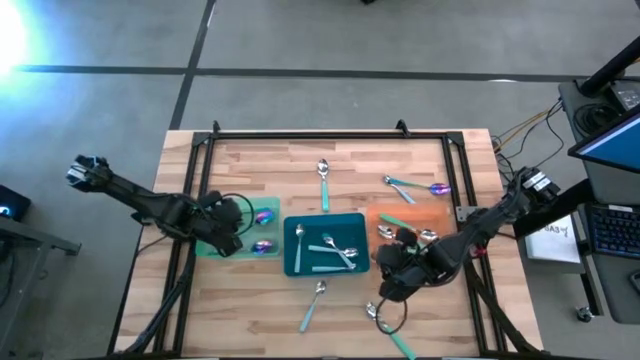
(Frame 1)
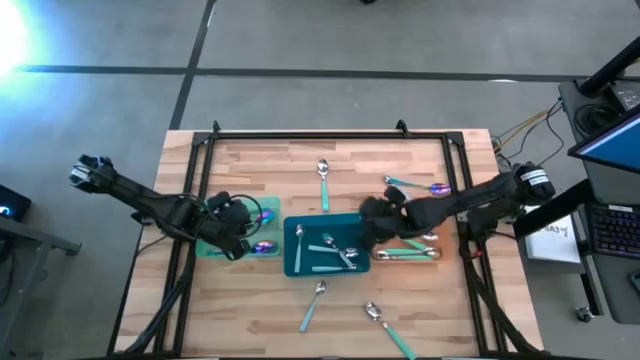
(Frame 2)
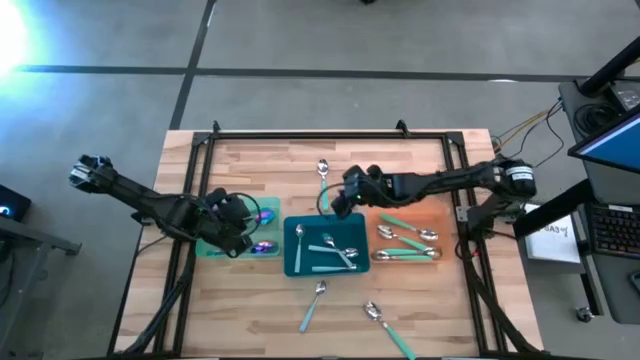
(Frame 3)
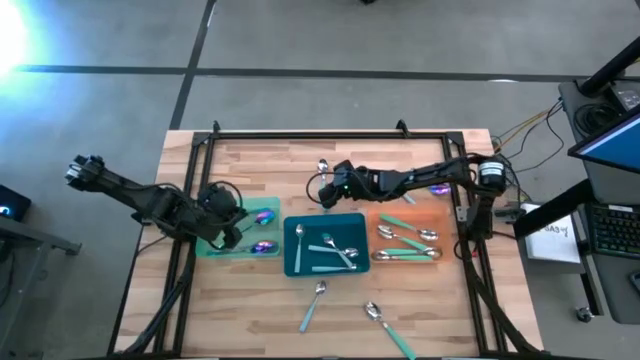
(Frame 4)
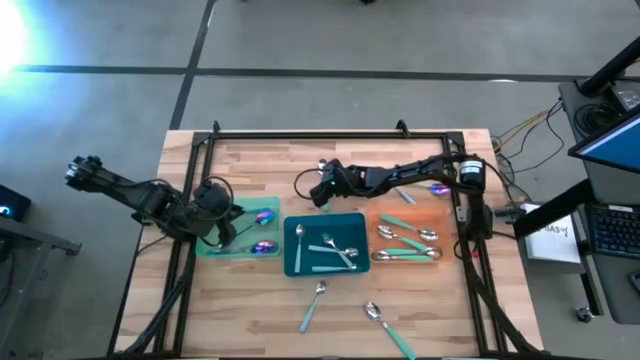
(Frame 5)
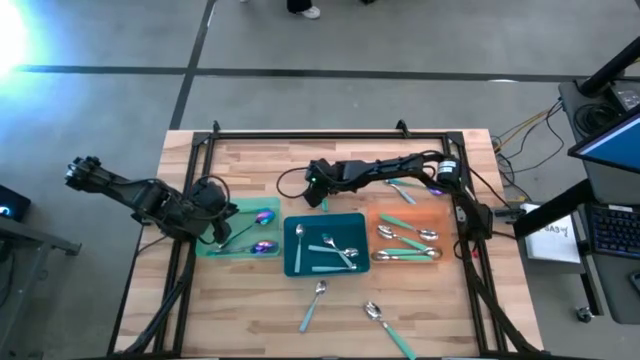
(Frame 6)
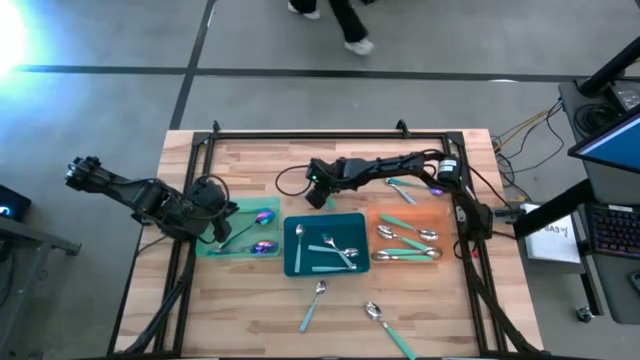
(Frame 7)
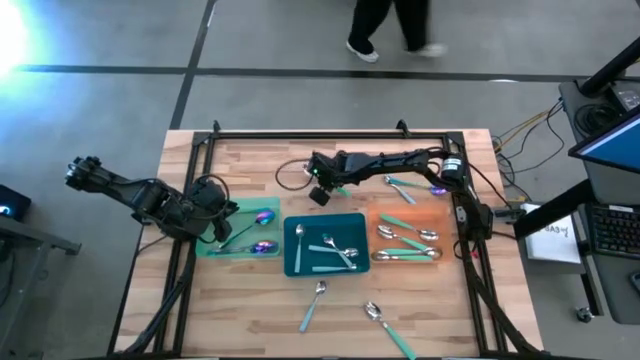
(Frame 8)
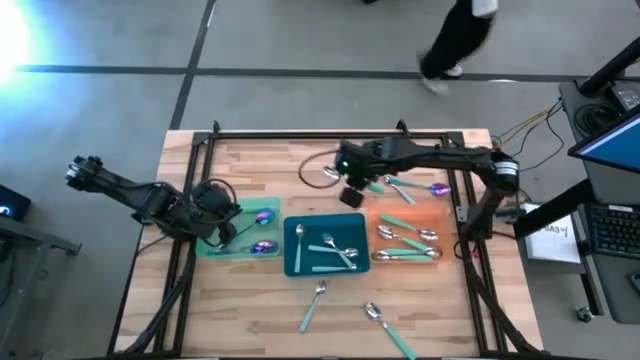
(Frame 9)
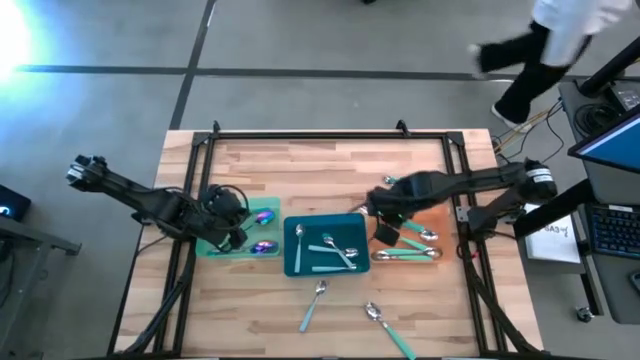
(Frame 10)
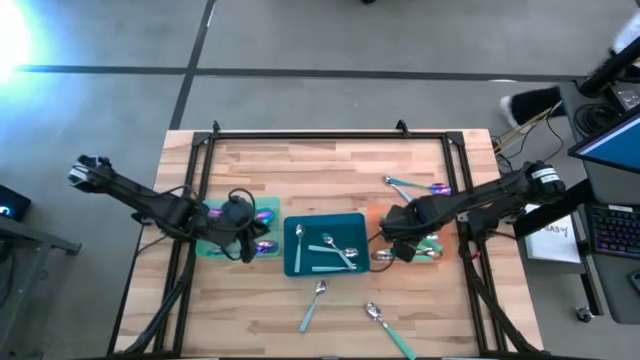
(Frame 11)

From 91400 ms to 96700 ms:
Task: Sort silverware by color (type)
Put the green spoon into the orange bin

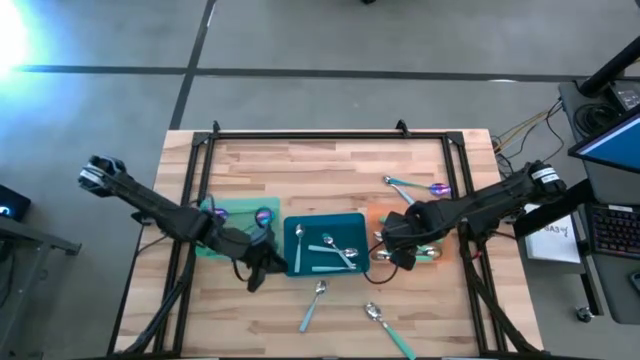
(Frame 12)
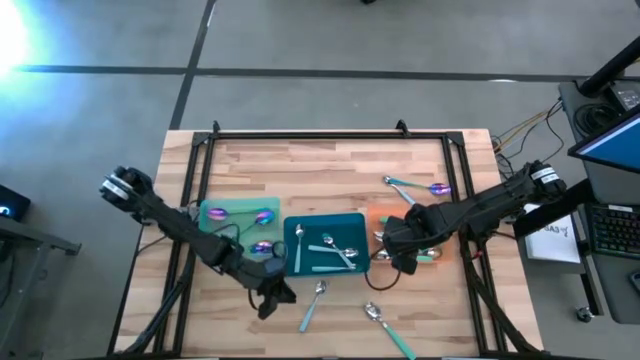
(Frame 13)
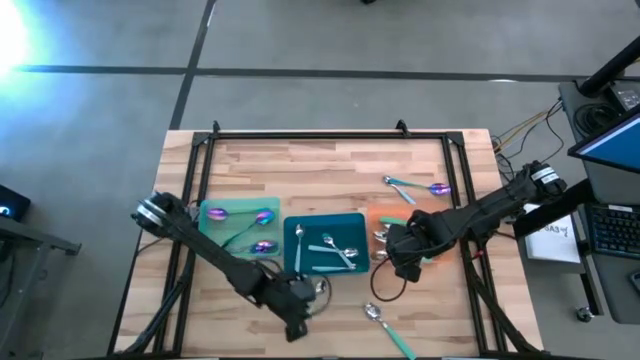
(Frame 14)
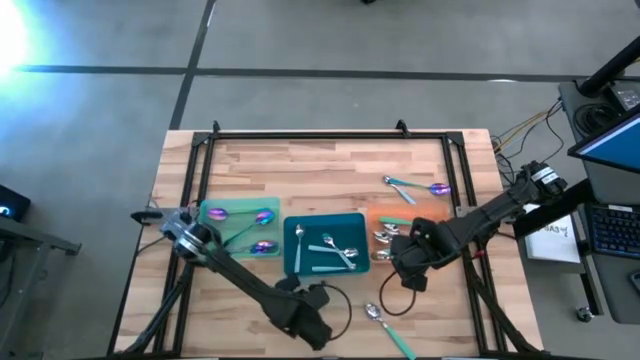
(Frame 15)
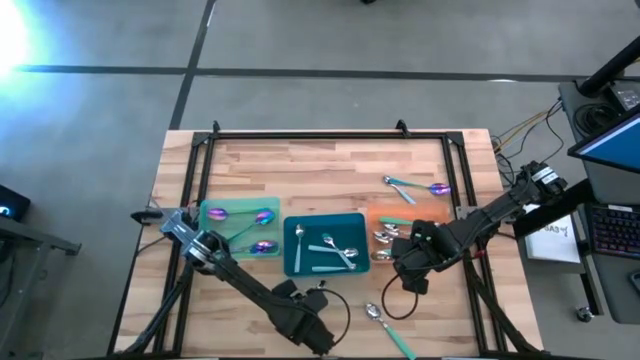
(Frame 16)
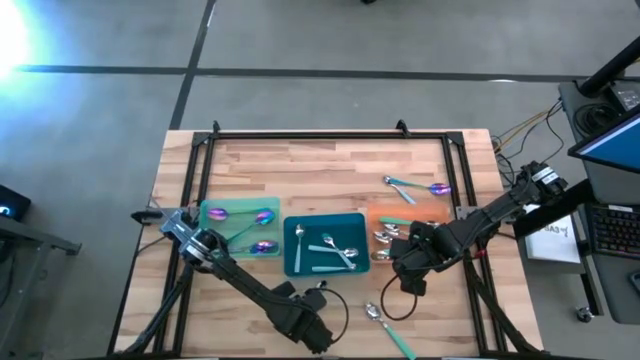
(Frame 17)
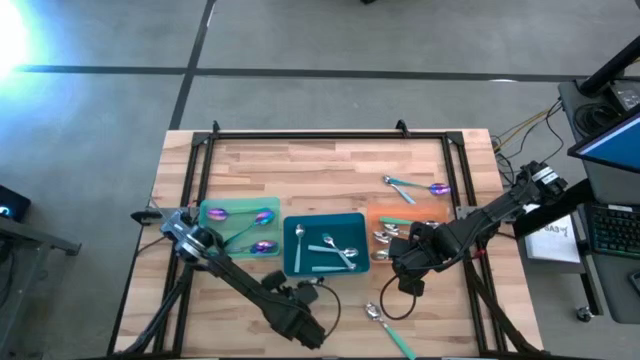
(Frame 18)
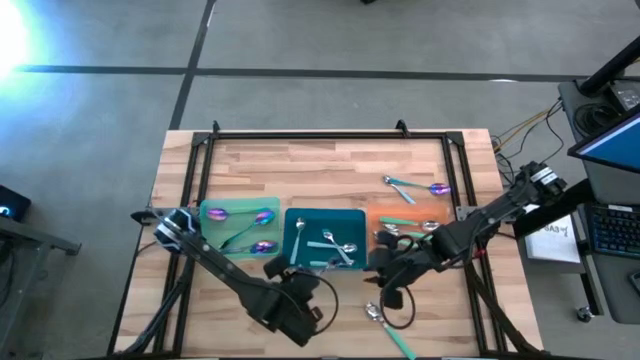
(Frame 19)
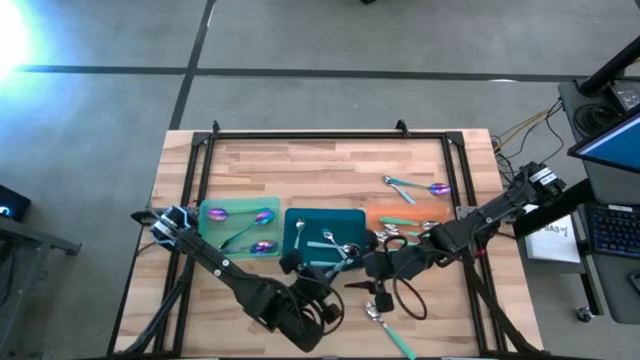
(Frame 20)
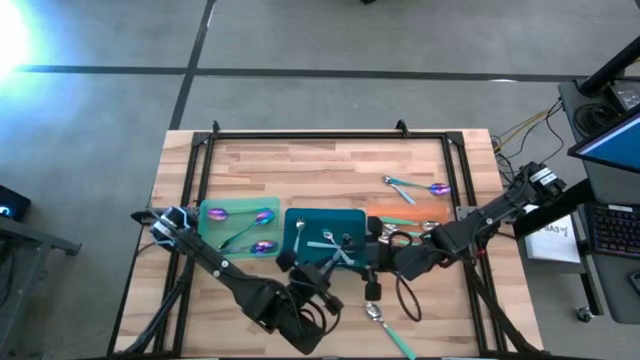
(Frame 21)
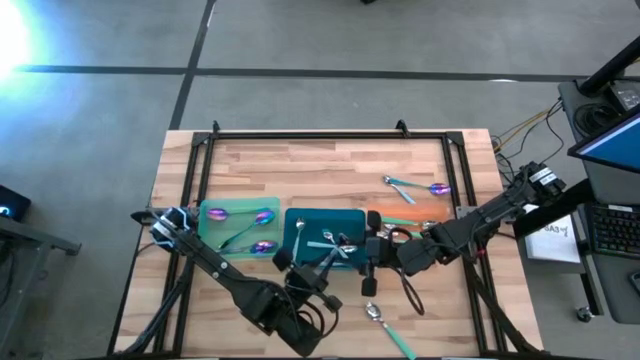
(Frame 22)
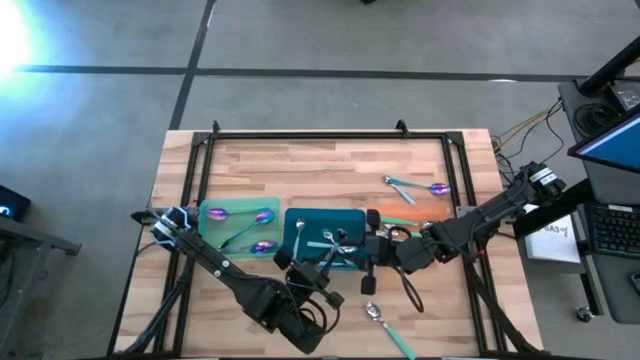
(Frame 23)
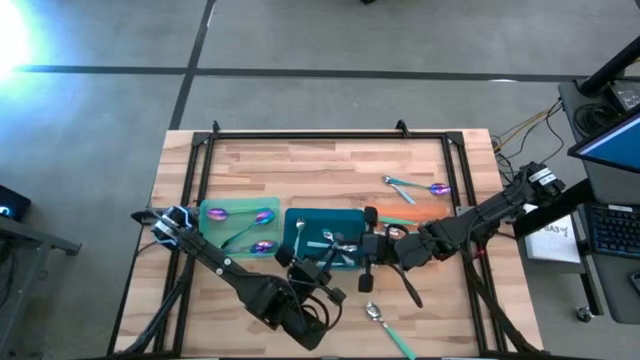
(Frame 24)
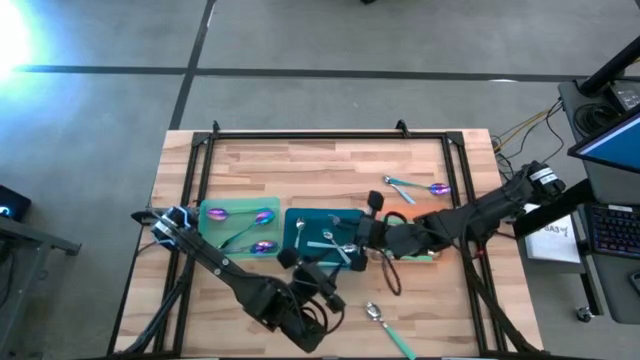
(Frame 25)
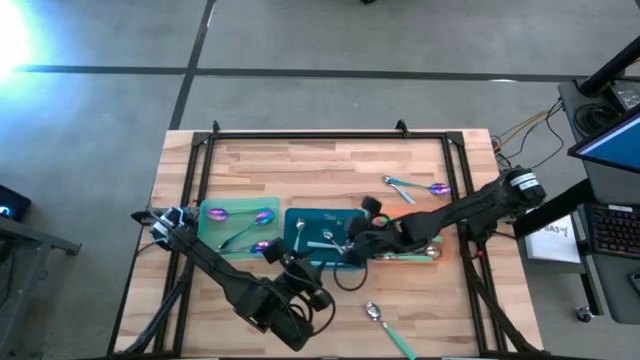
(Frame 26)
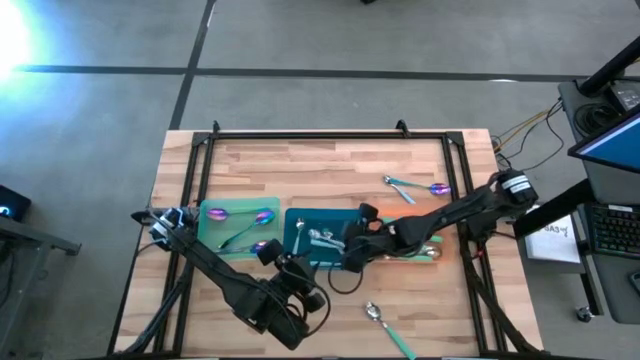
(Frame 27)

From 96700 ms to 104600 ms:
Put the blue spoon into the blue bin

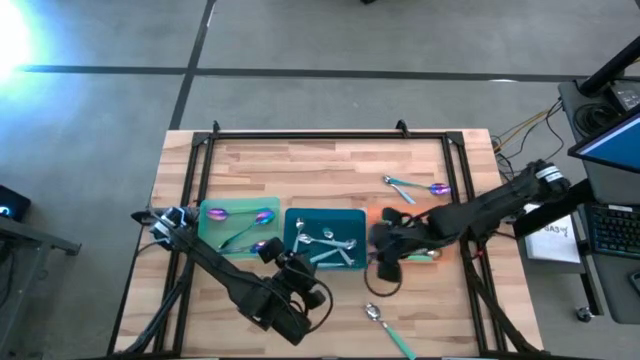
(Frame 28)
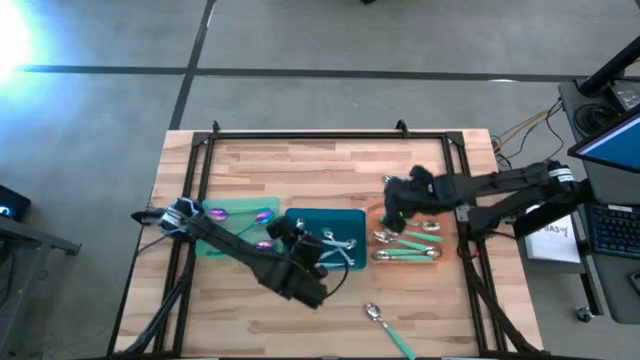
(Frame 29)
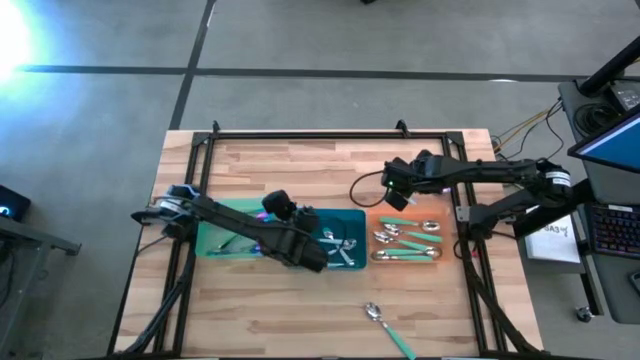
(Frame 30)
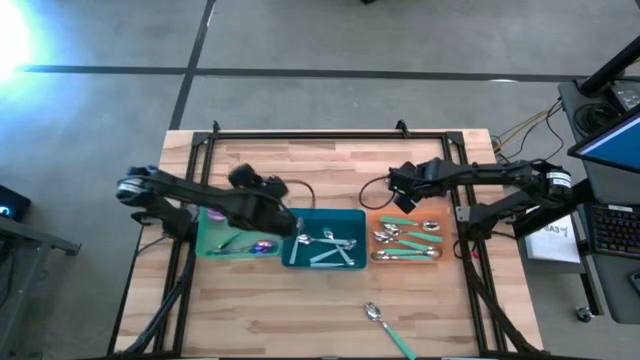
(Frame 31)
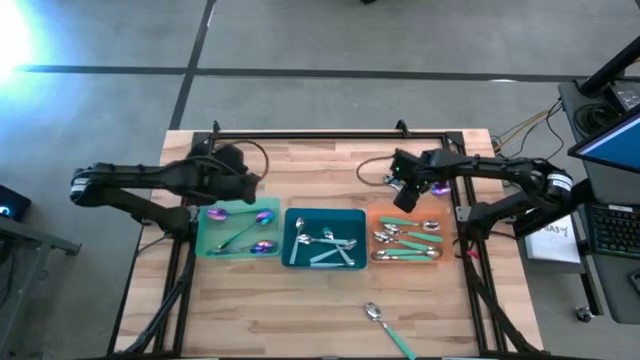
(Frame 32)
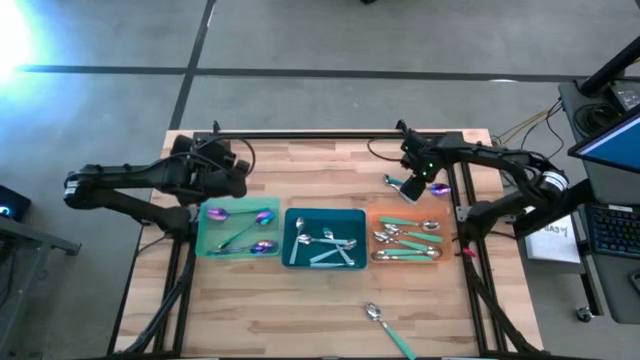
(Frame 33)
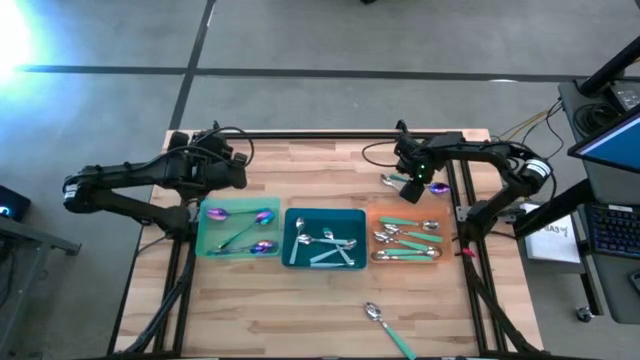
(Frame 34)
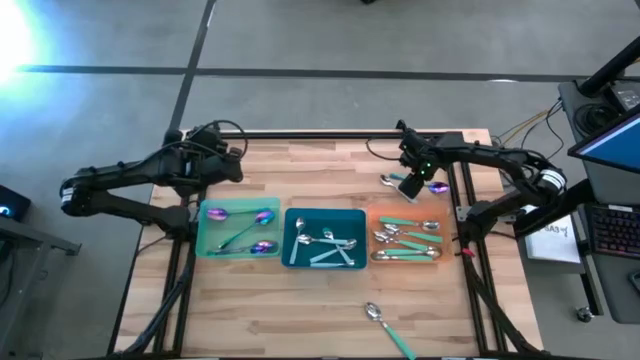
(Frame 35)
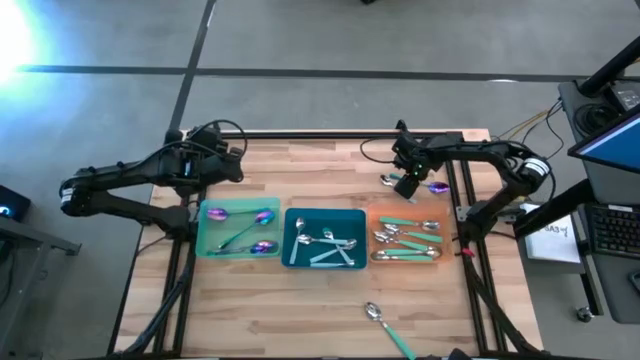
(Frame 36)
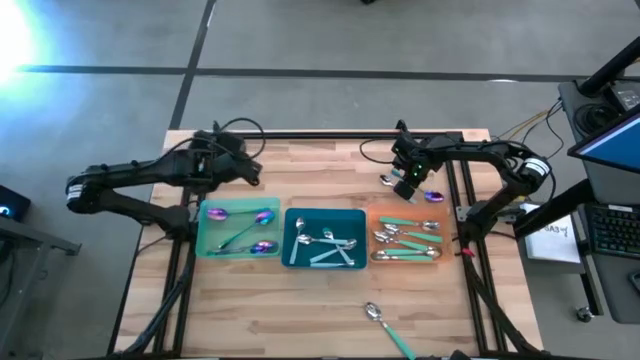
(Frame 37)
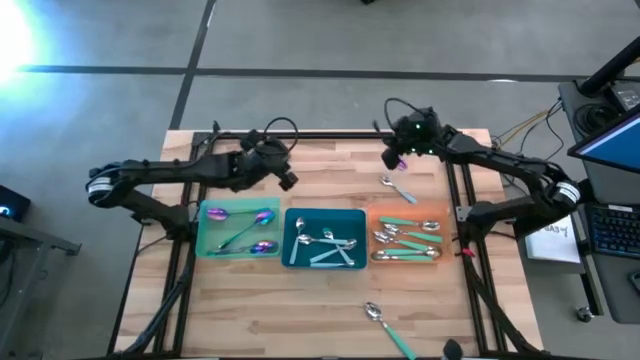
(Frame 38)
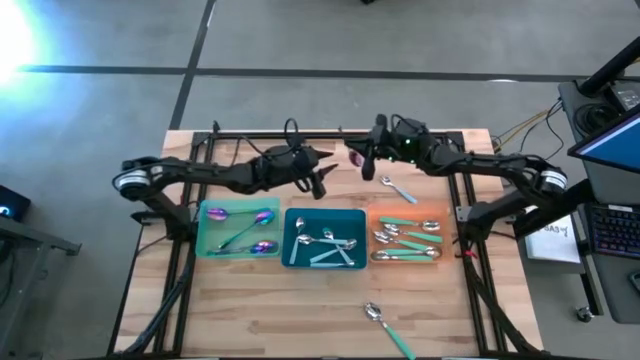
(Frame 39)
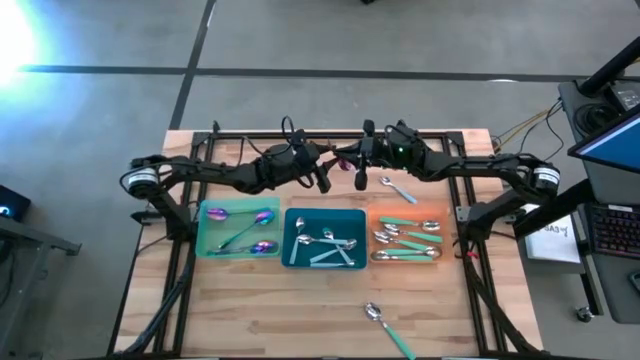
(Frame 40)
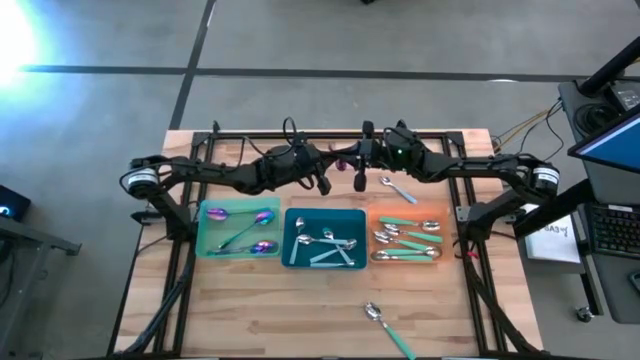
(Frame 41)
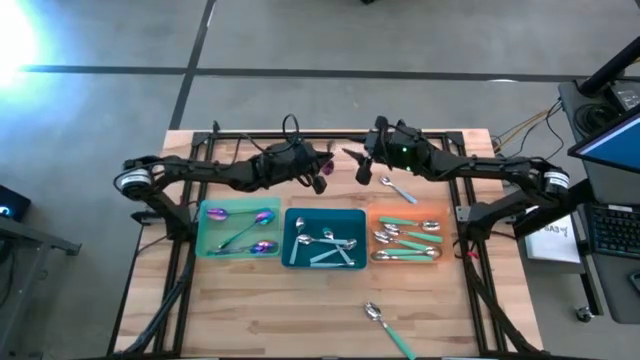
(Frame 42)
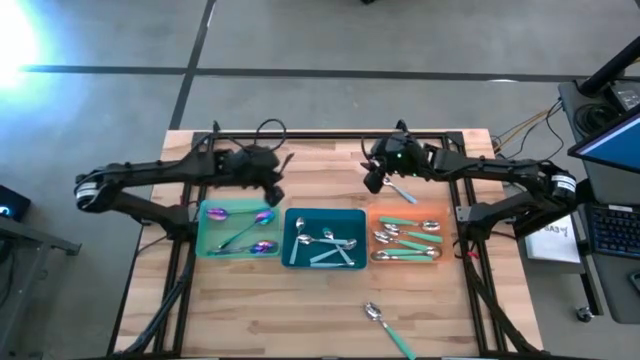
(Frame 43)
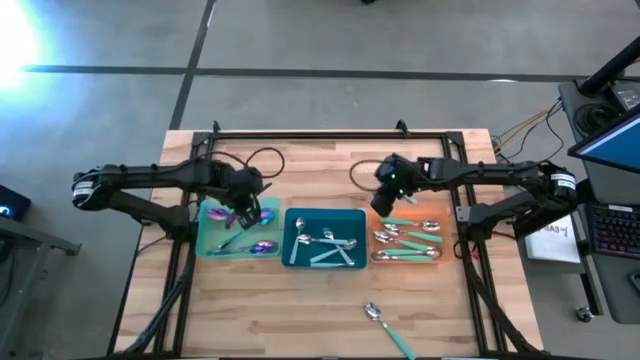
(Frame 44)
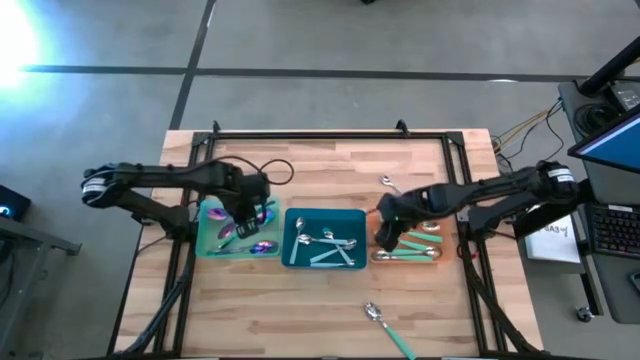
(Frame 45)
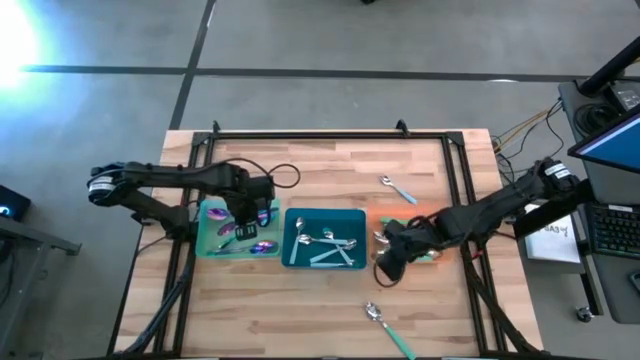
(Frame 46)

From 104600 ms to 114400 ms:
Put the violet spoon into the green bin
